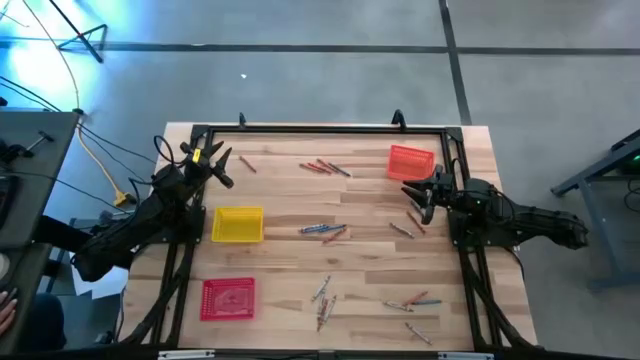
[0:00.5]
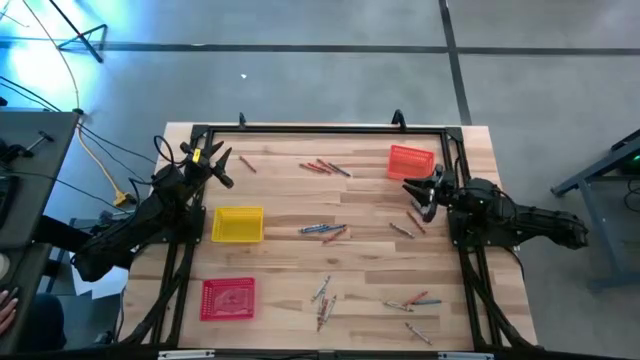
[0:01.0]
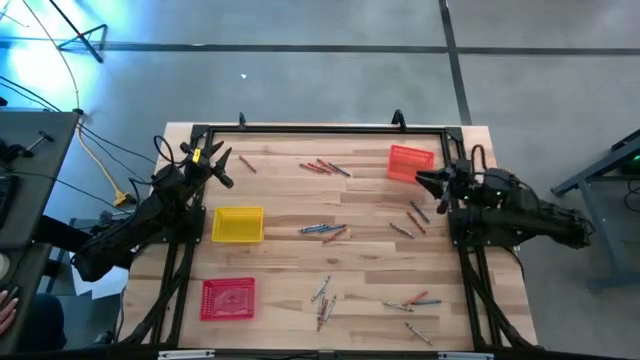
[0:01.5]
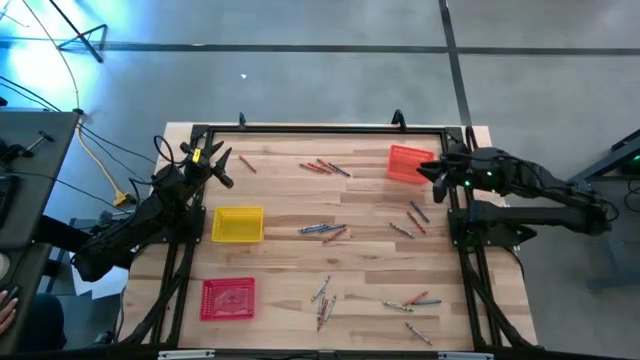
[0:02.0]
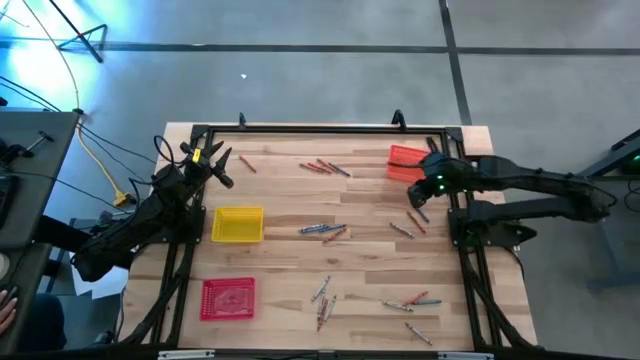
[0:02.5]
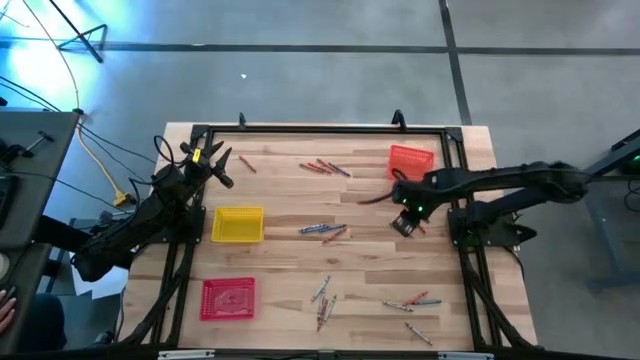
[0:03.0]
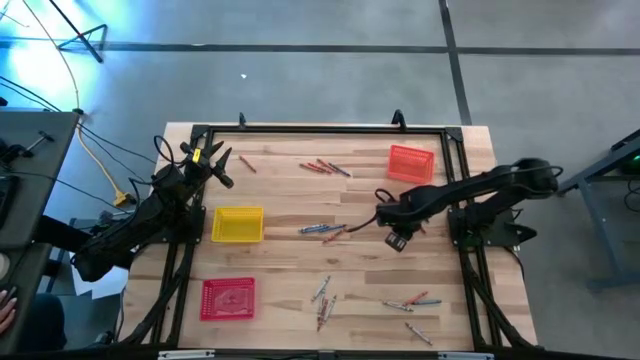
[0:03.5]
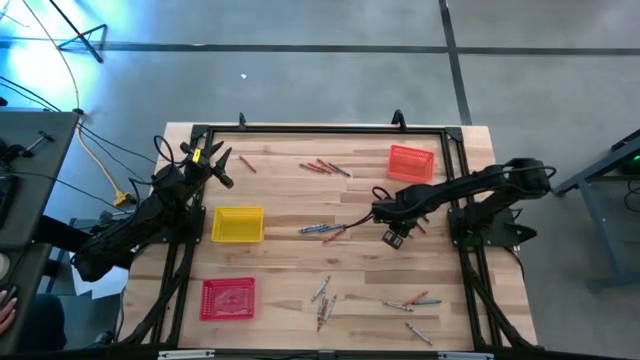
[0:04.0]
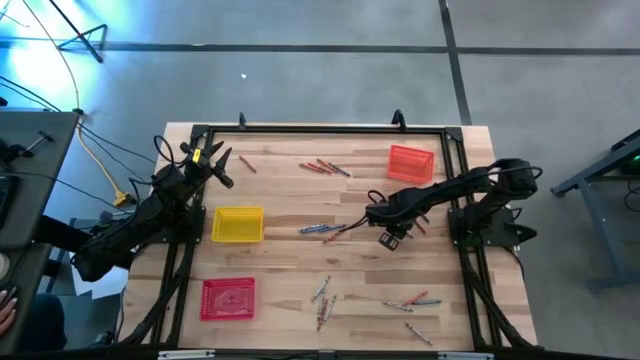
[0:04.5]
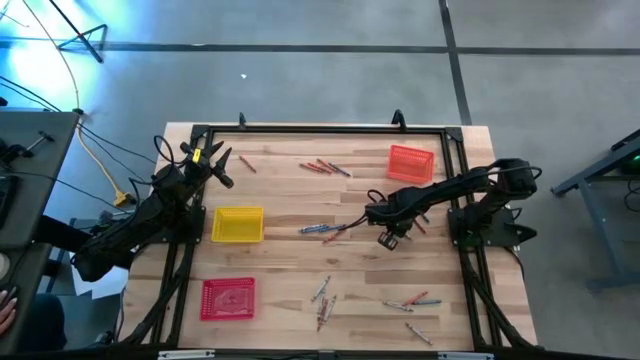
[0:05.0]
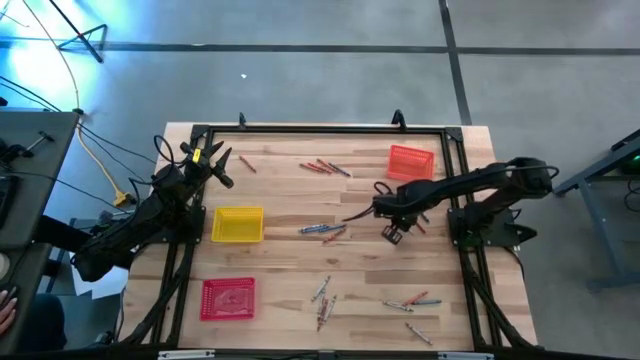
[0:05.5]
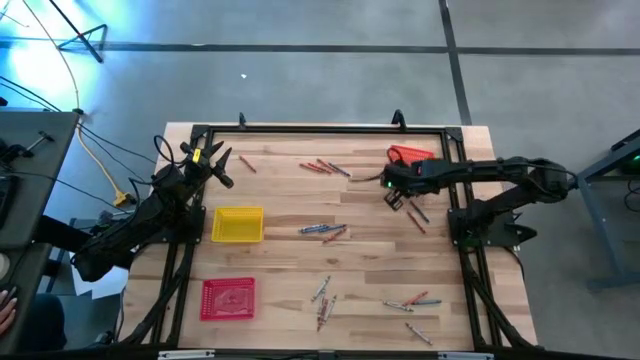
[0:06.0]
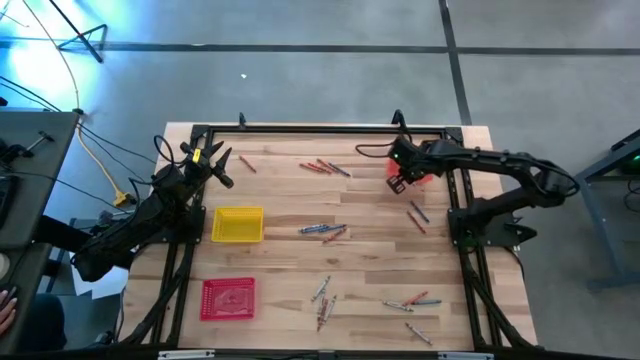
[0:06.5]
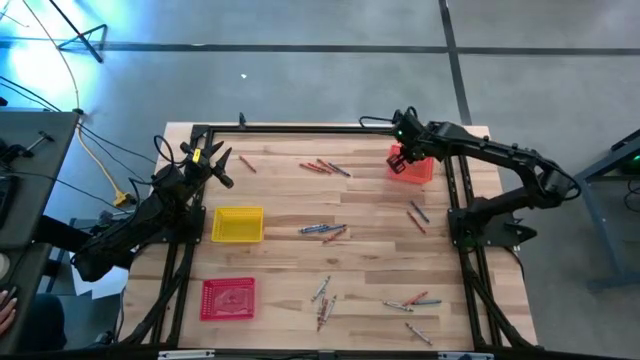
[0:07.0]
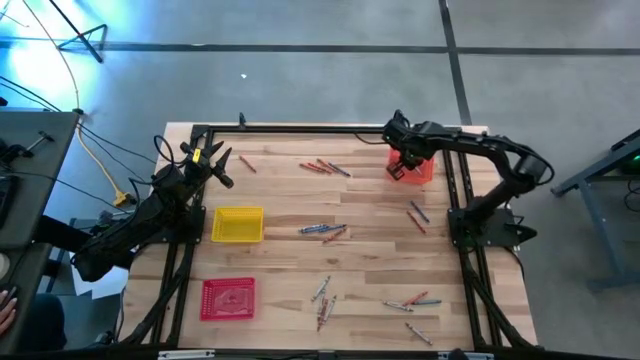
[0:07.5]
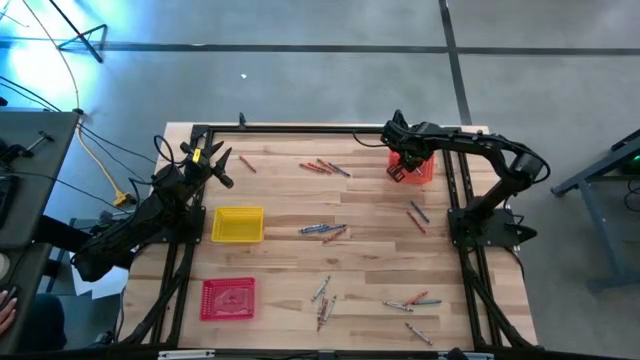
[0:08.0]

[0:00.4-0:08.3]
Task: Sort crayons
Put the gray crayon into the orange bin

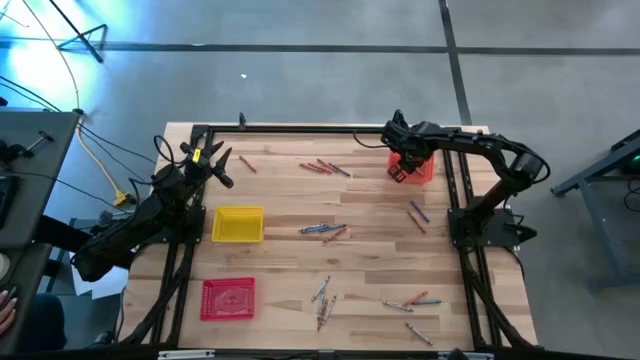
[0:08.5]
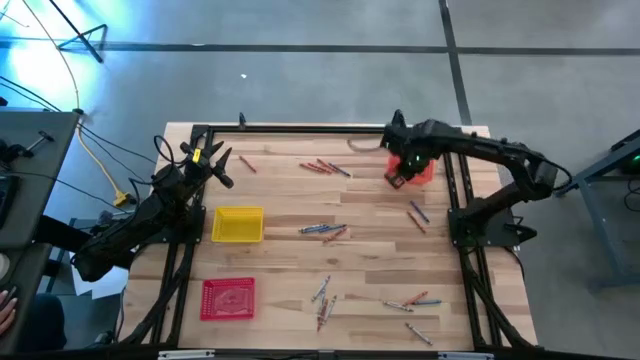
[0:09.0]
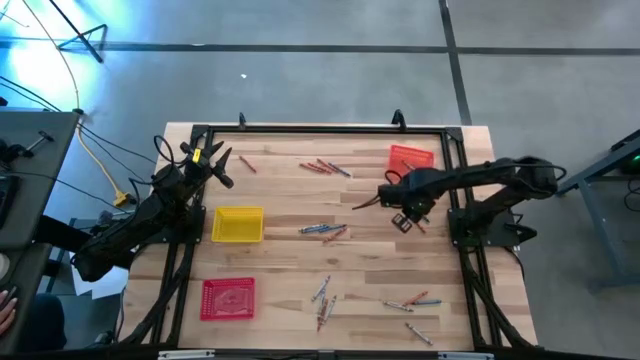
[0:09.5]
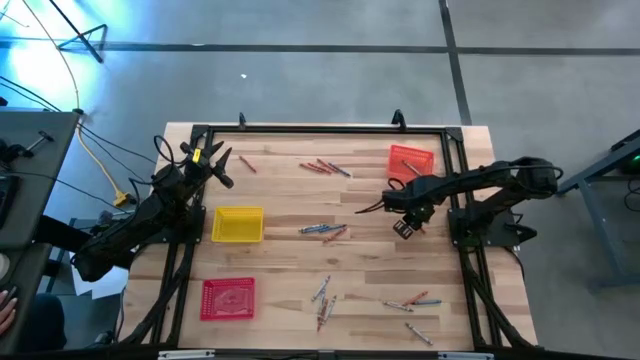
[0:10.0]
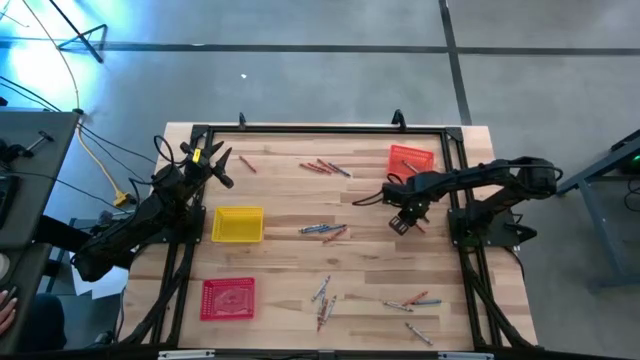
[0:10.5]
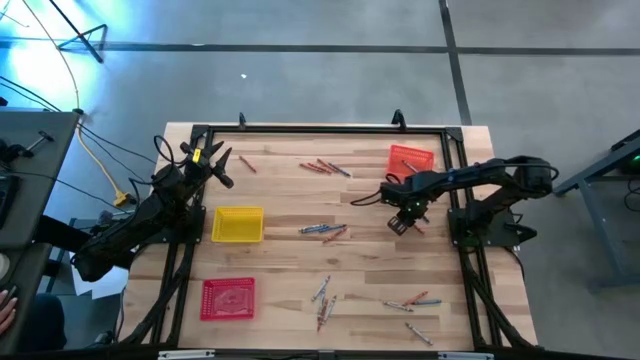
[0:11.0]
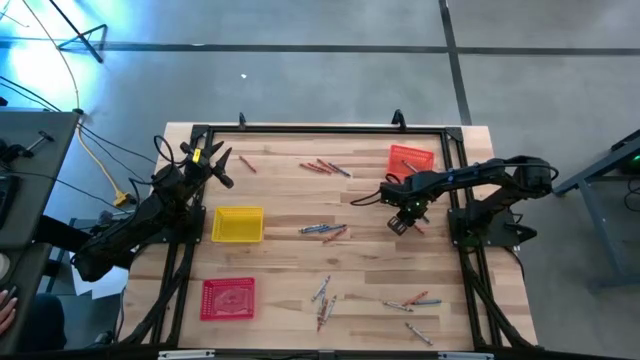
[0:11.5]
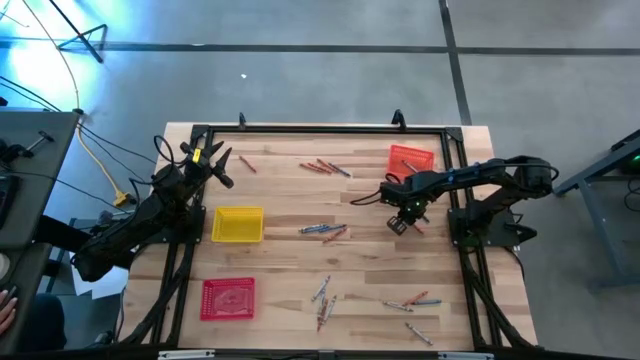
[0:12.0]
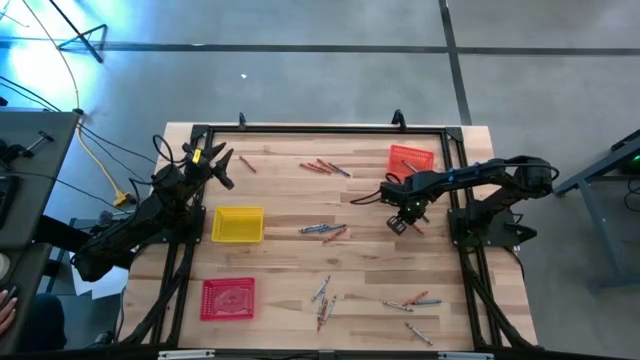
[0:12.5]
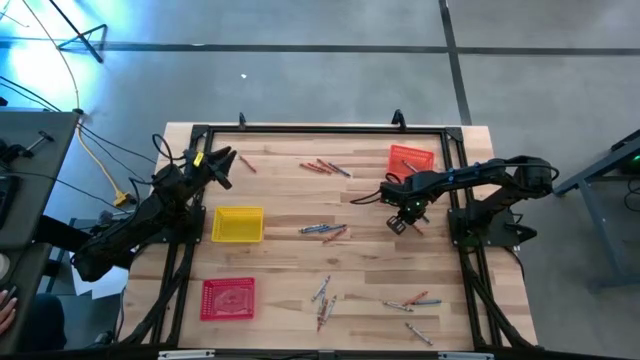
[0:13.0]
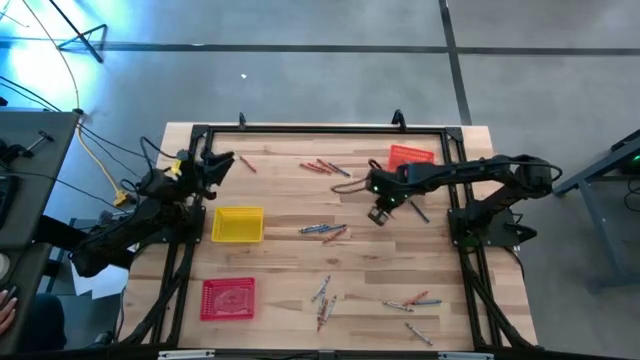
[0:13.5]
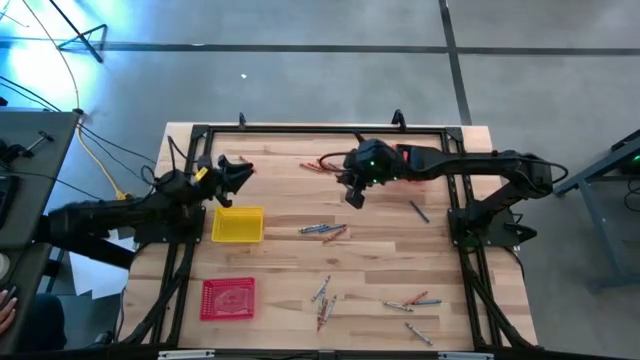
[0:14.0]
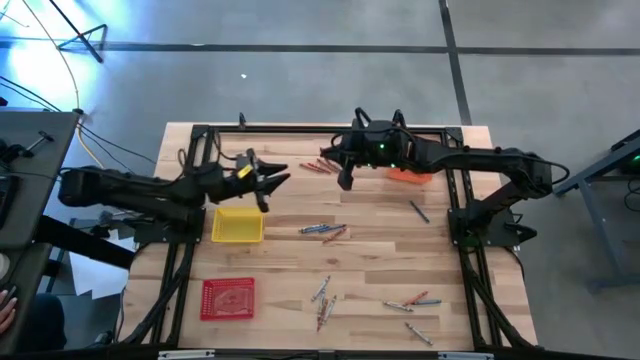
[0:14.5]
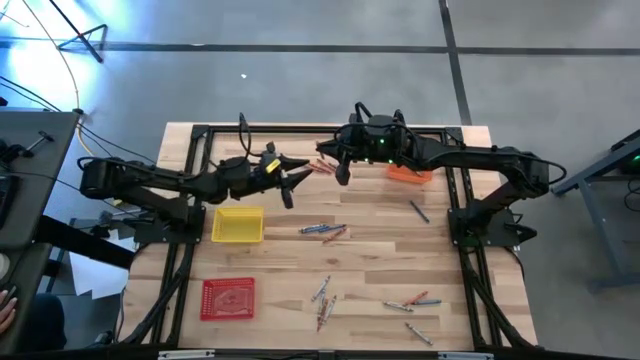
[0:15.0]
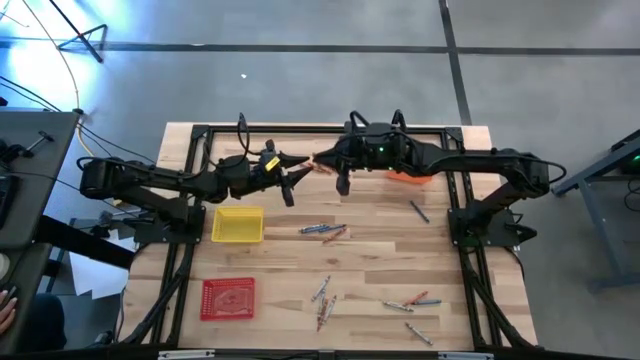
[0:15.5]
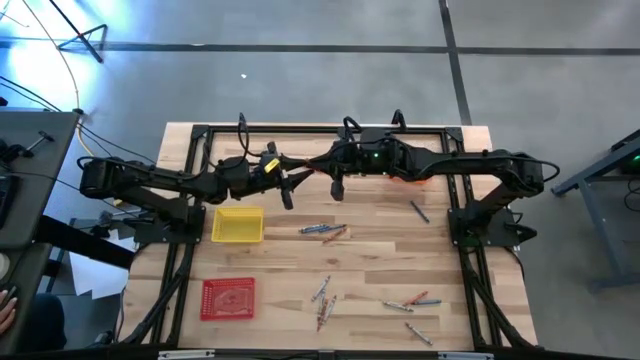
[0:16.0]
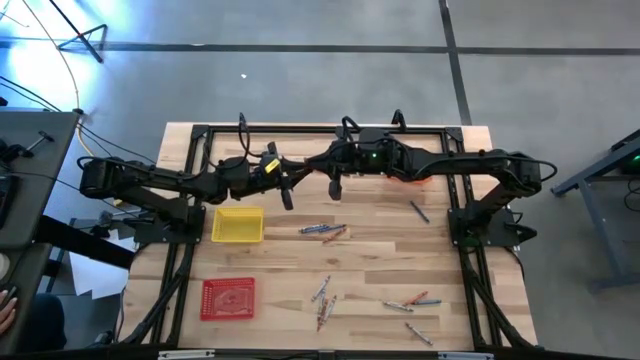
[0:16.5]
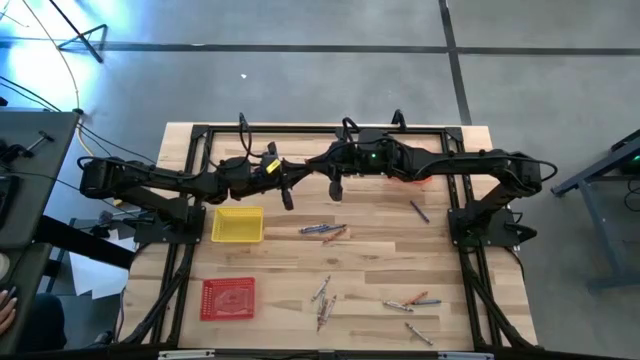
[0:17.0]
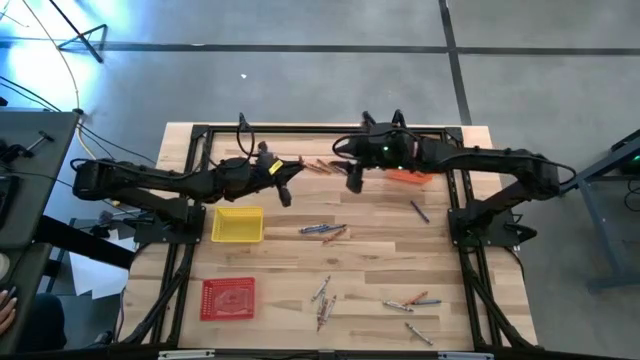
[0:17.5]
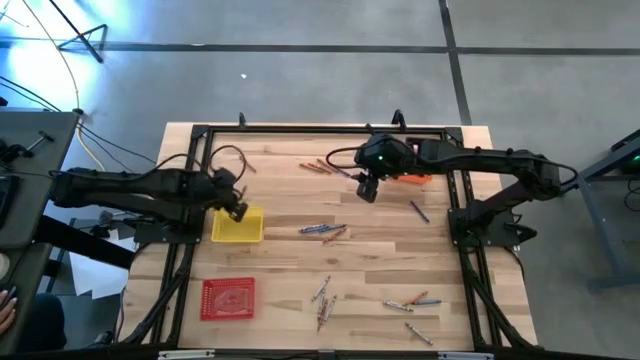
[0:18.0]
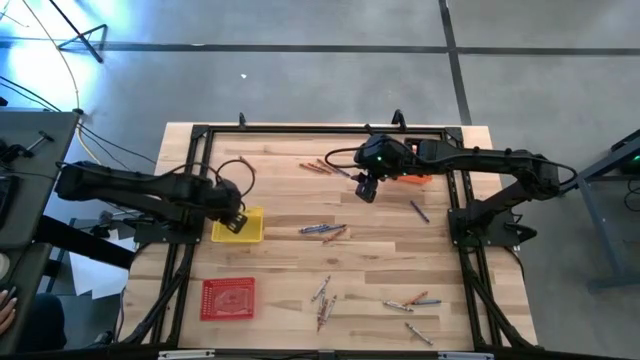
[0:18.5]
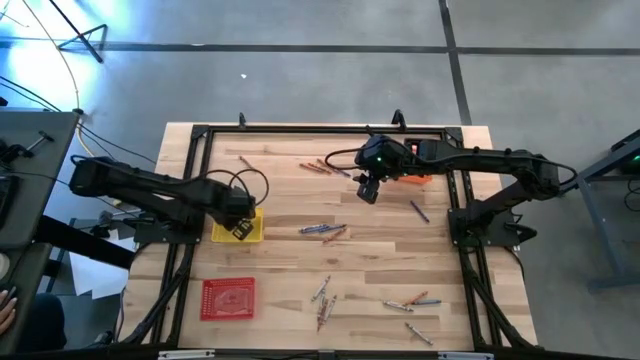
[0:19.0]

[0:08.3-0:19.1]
Put the orange crayon into the yellow bin

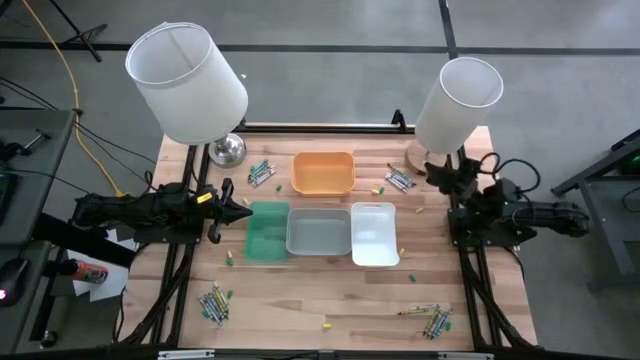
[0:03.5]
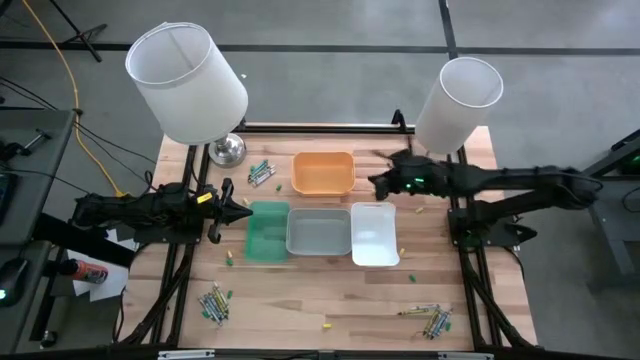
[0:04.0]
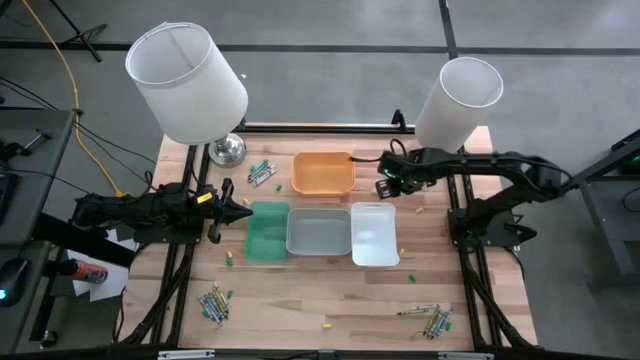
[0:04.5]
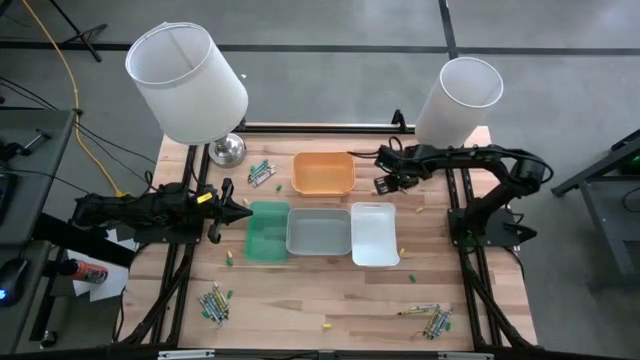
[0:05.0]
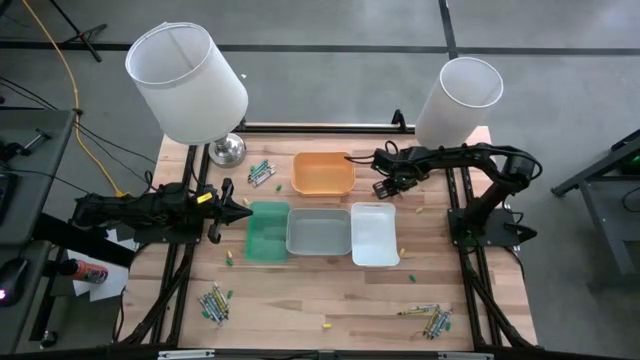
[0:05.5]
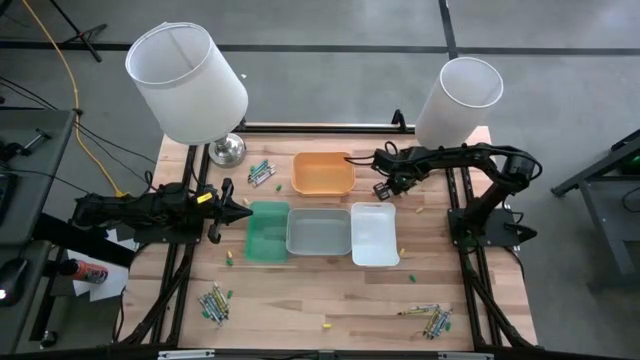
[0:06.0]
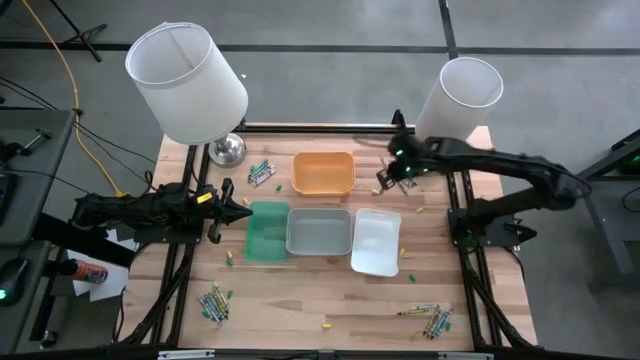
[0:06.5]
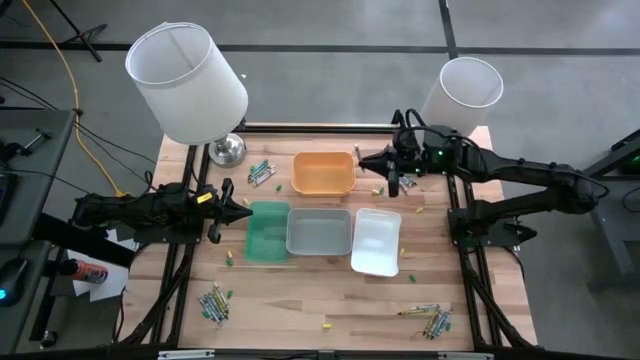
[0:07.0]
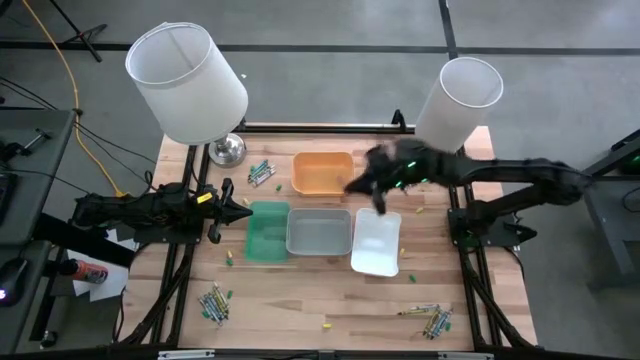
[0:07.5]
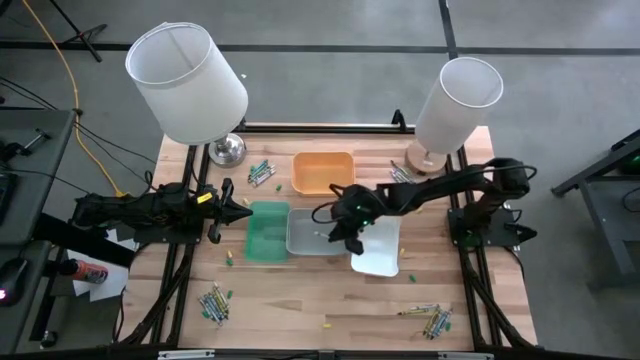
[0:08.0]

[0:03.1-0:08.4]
Task: Sort crayons
Put the white crayon into the gray bin
